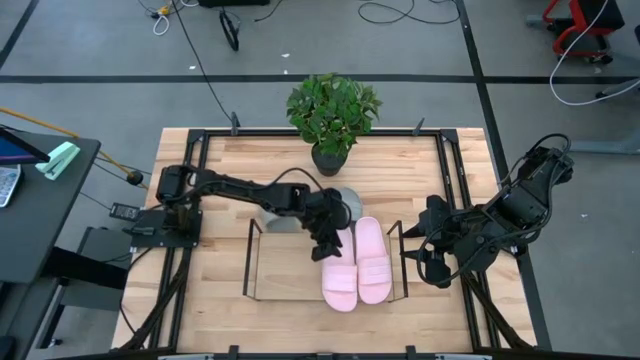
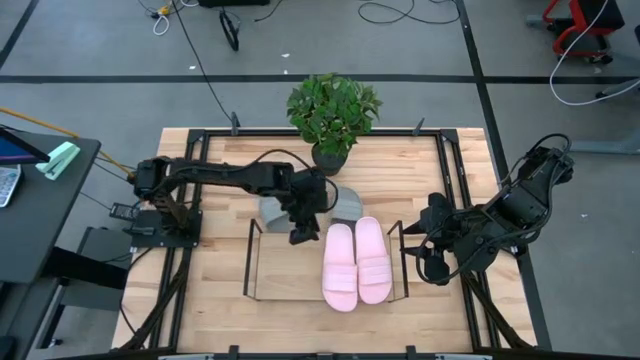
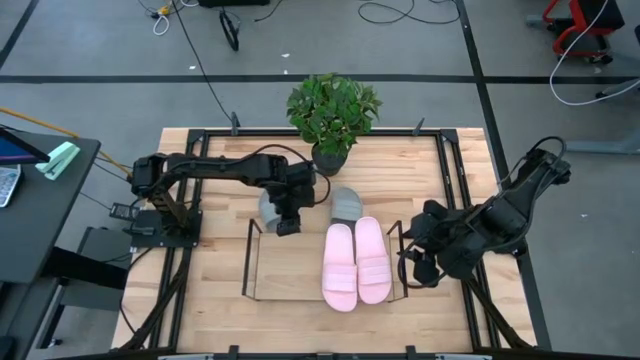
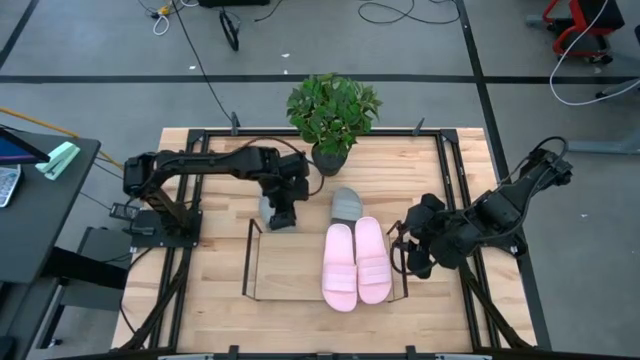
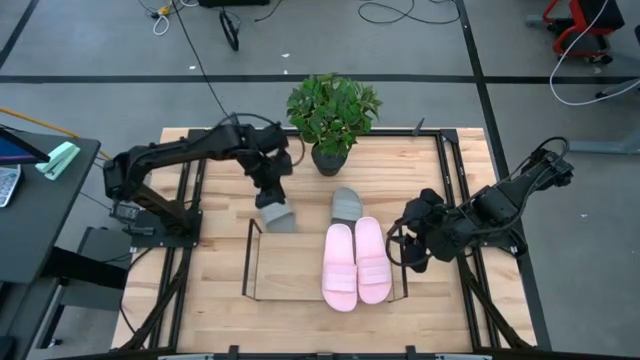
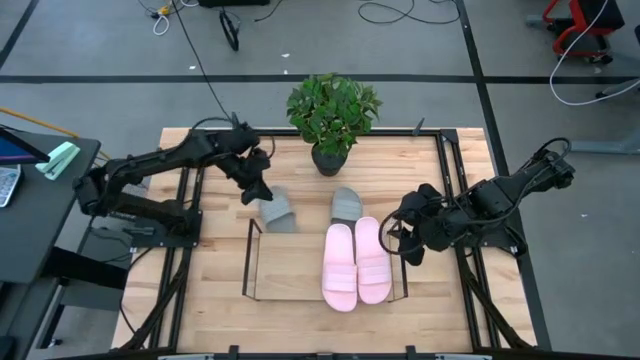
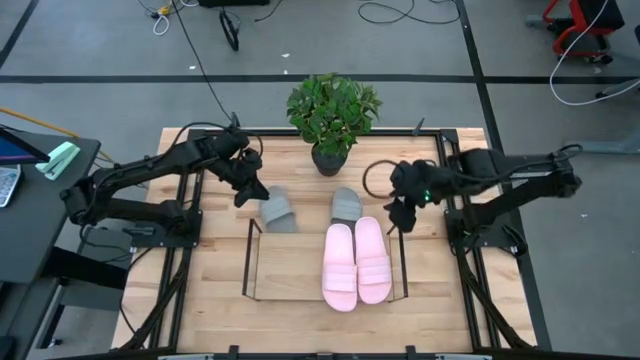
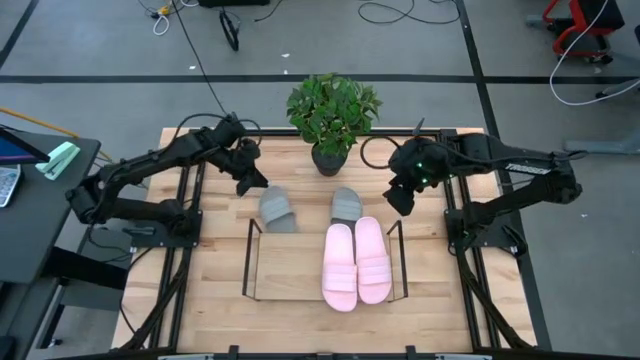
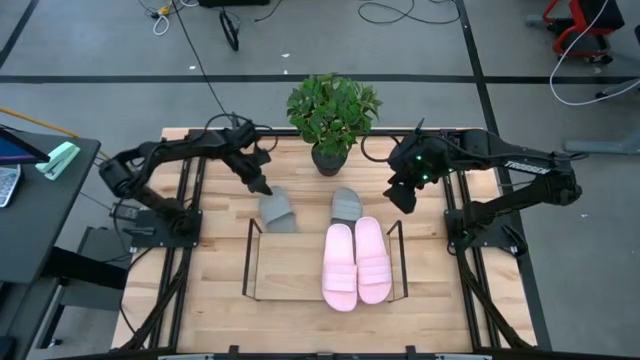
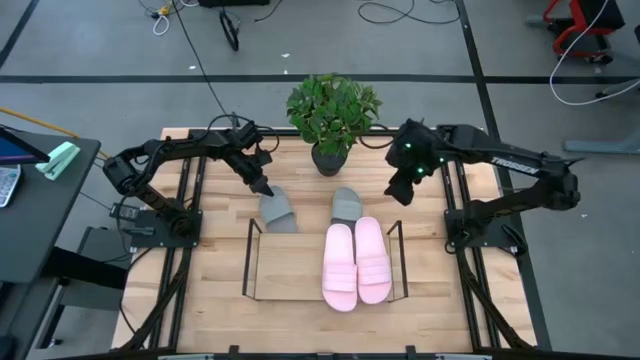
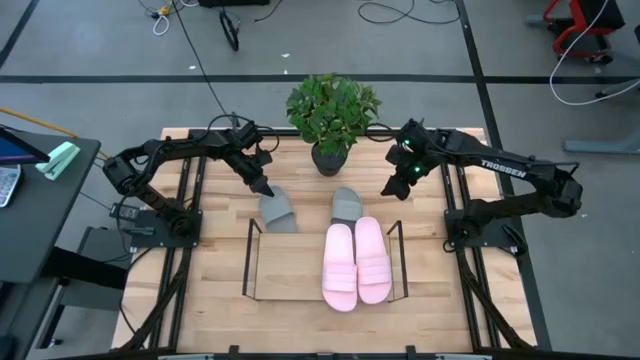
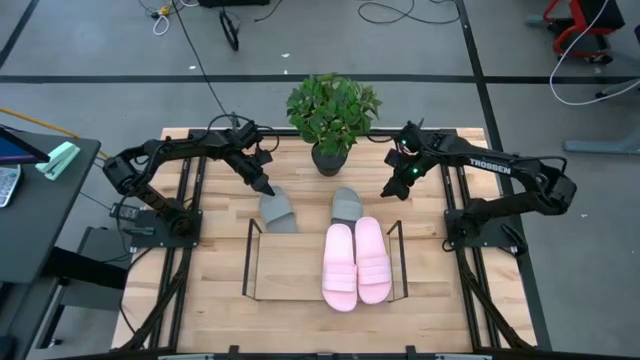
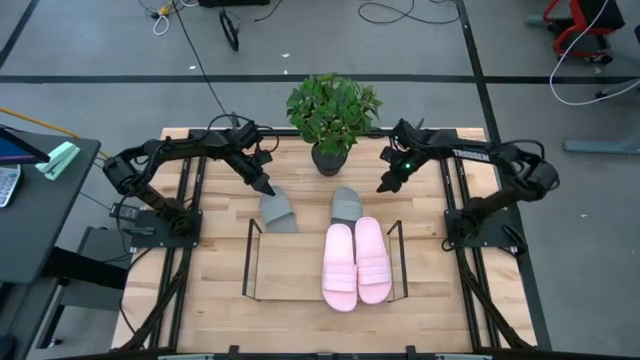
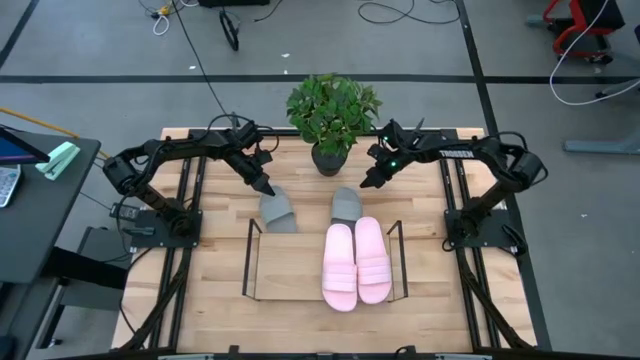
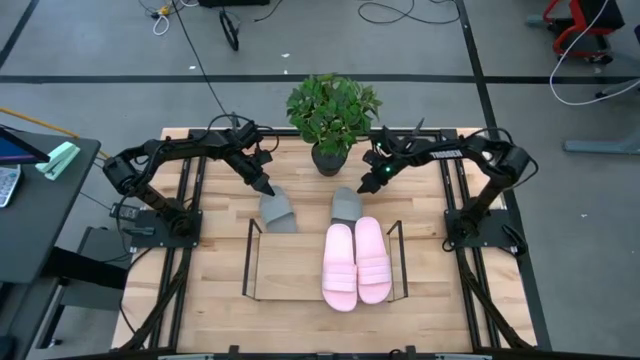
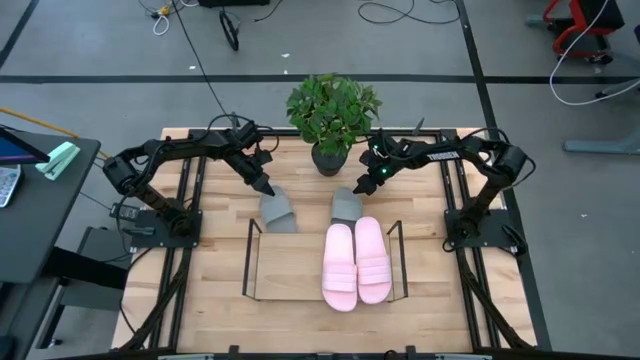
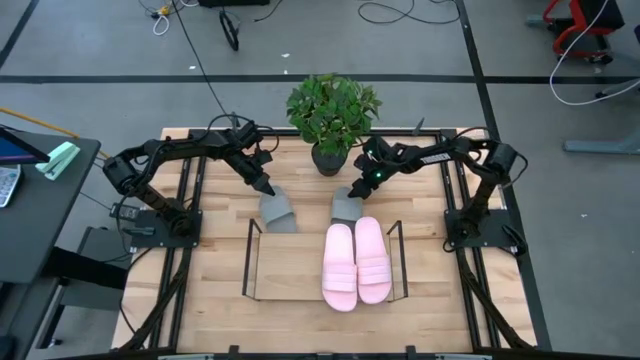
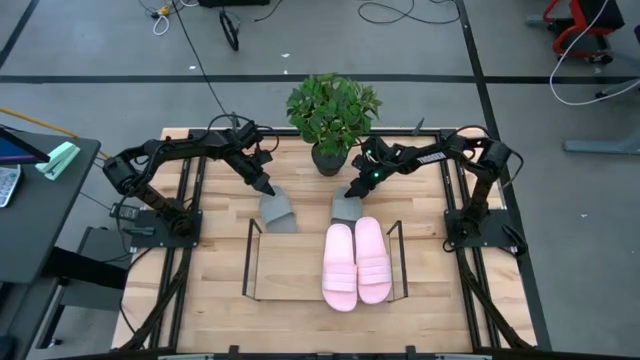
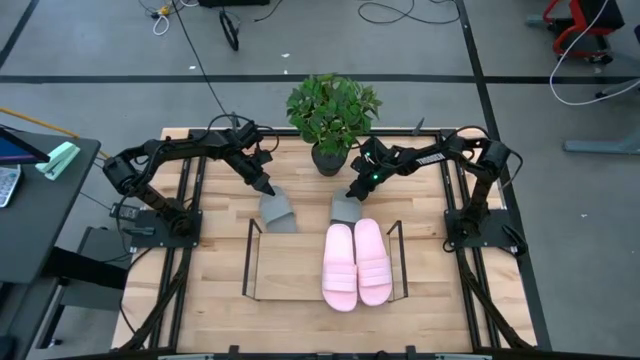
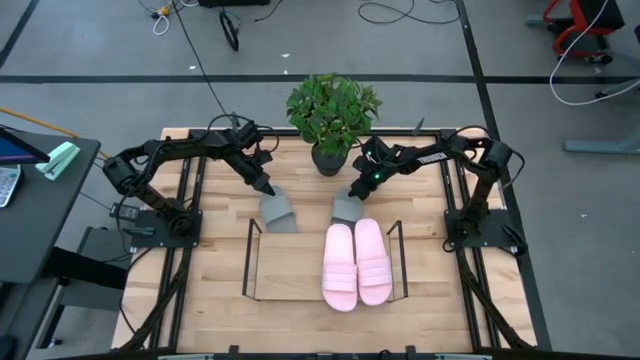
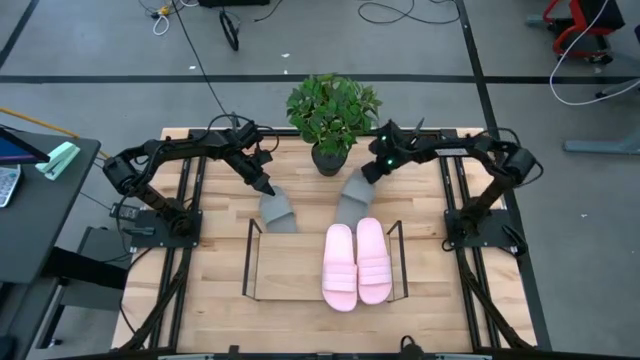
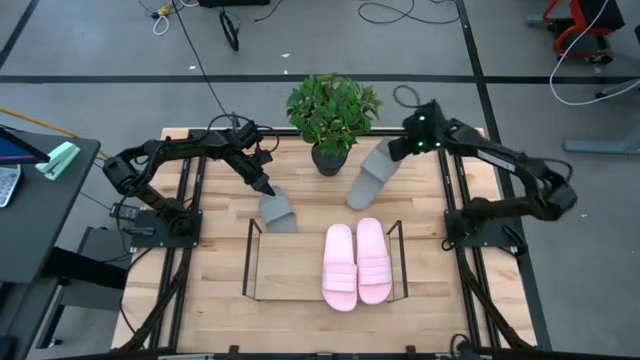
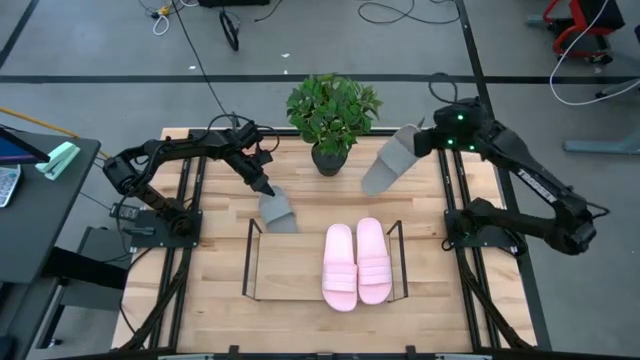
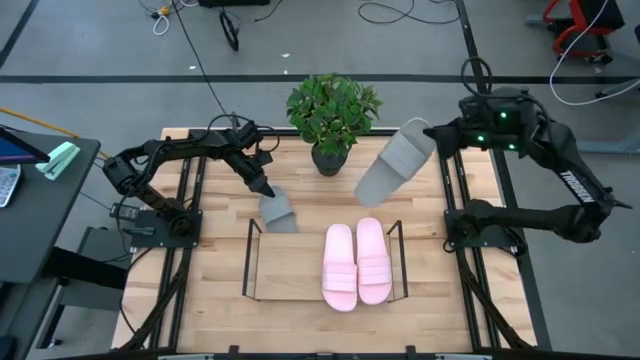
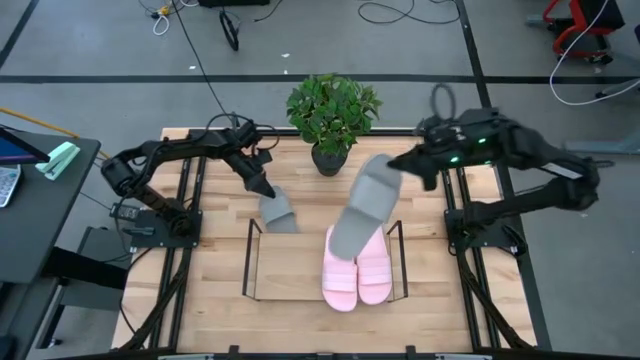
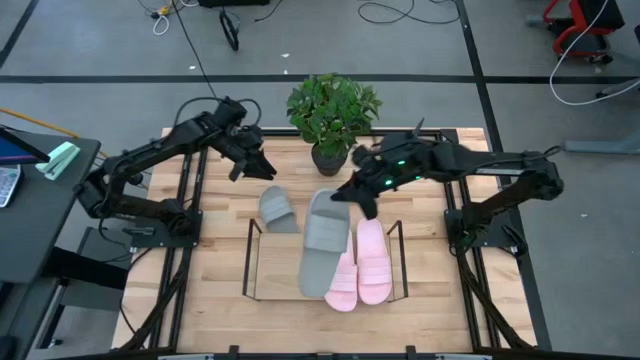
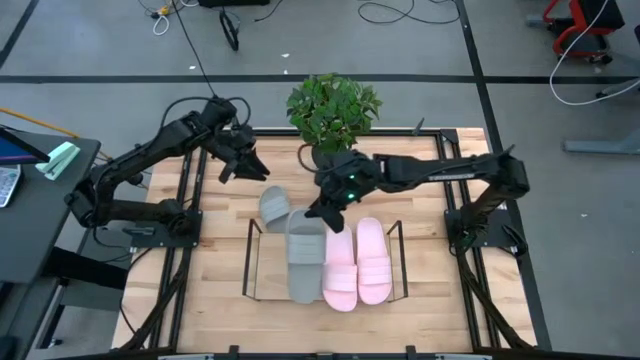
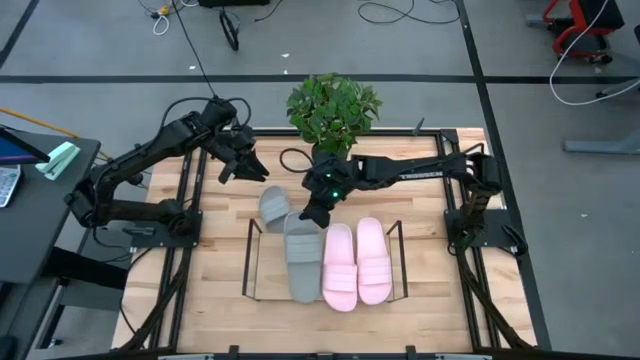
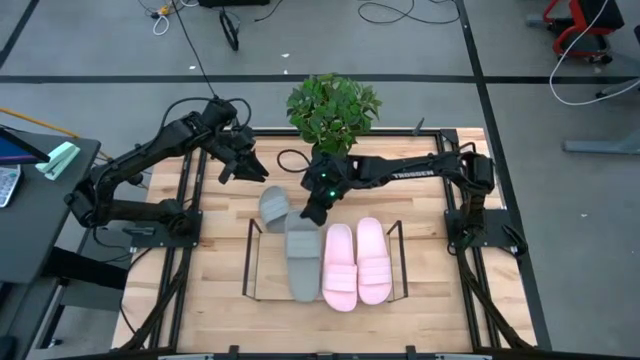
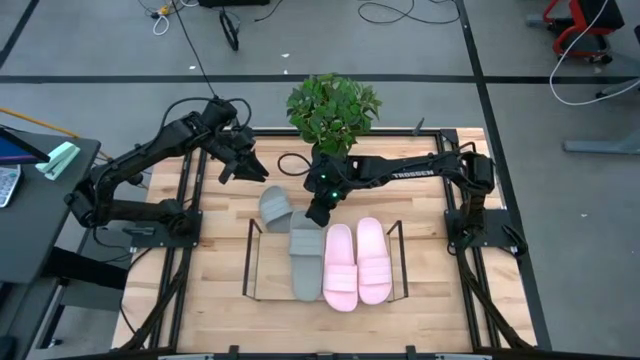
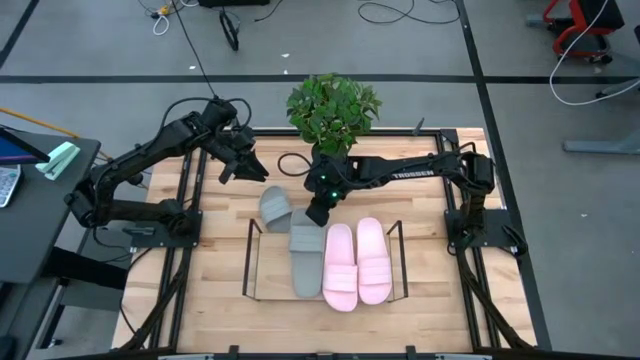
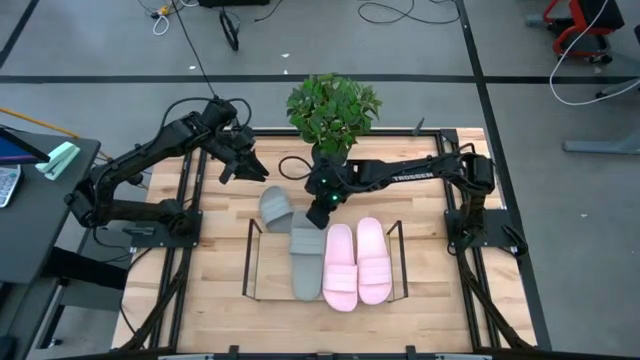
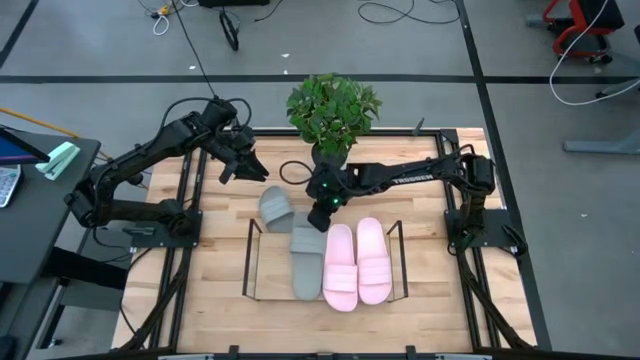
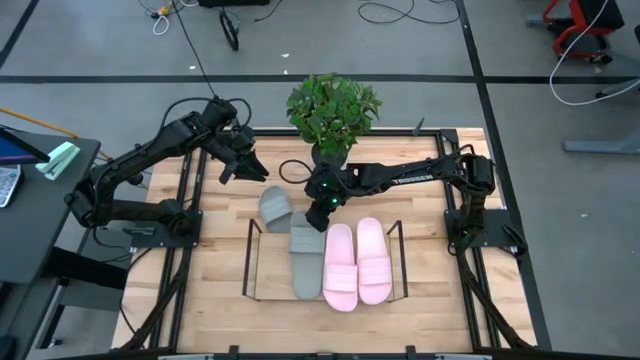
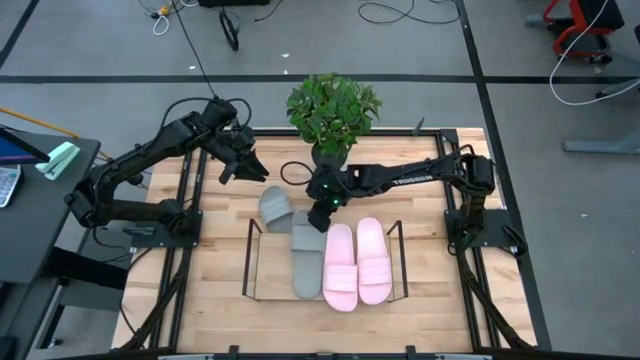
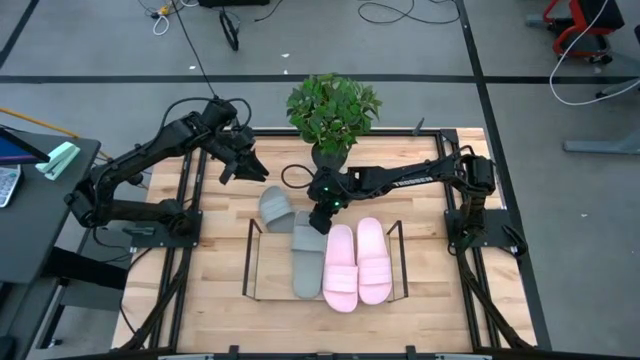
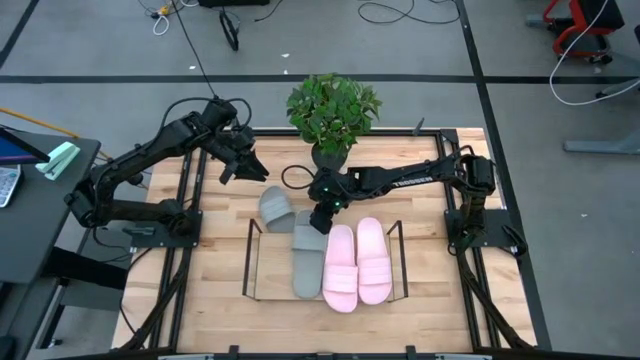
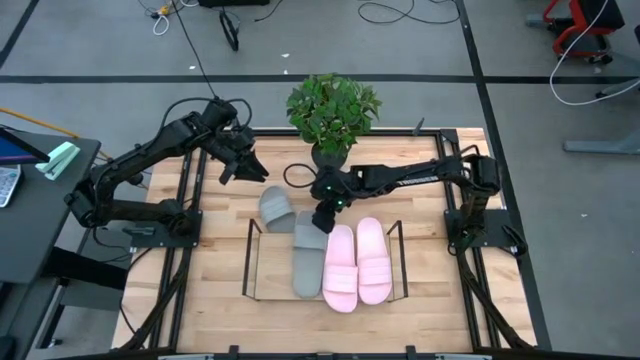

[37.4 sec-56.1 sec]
Task: Pick and place slides into the shelf
Put the right gray slipper on the shelf

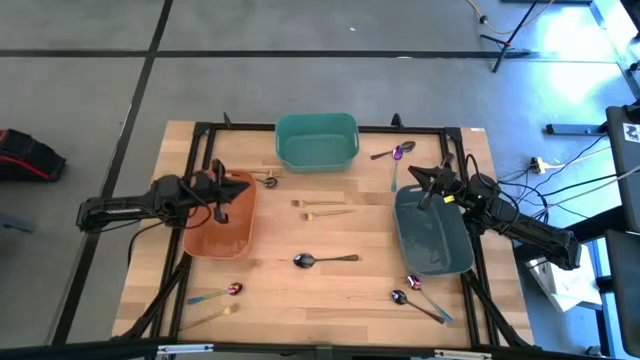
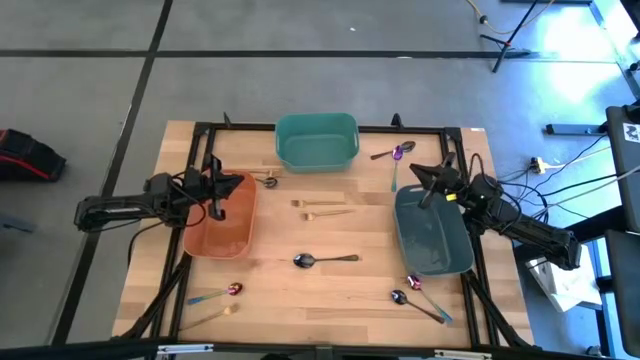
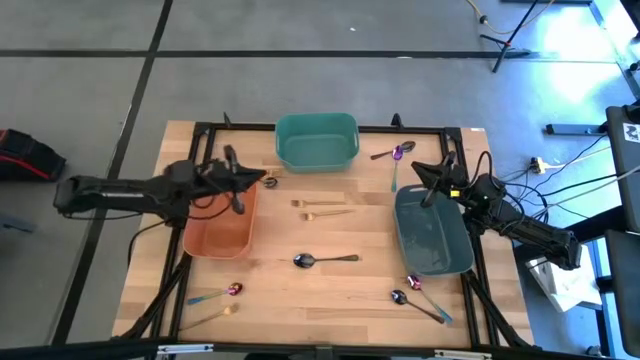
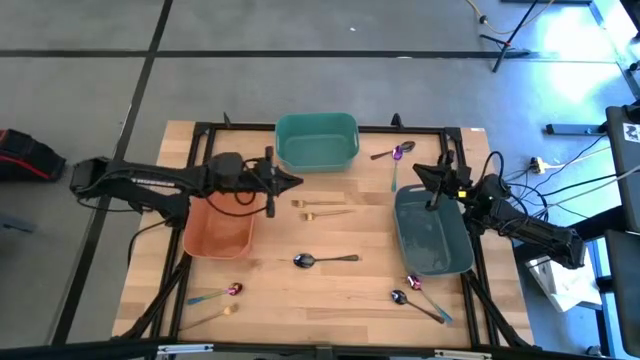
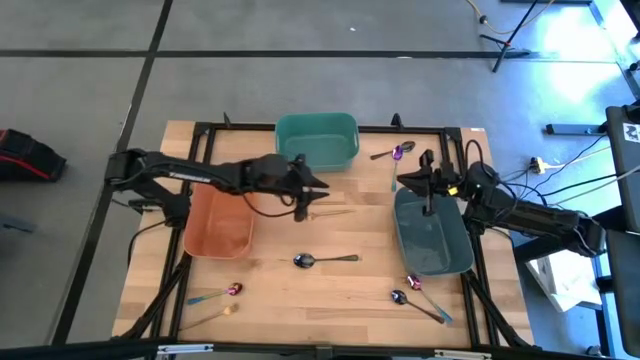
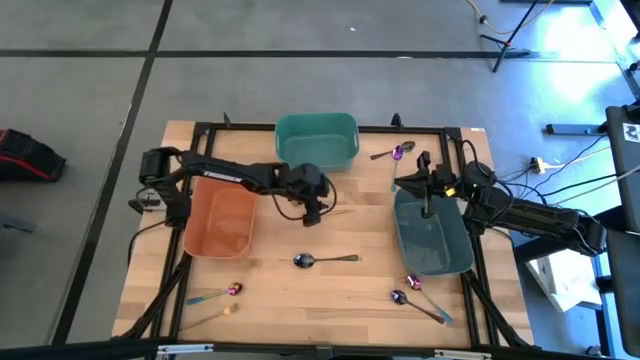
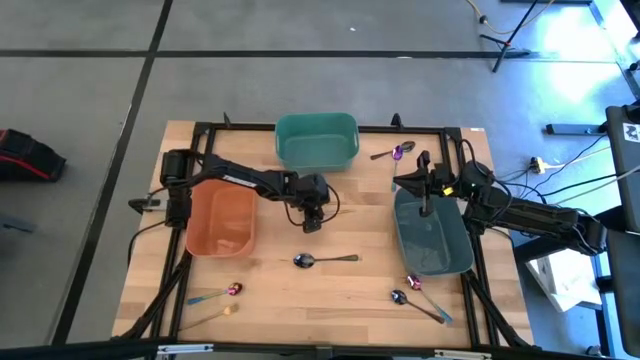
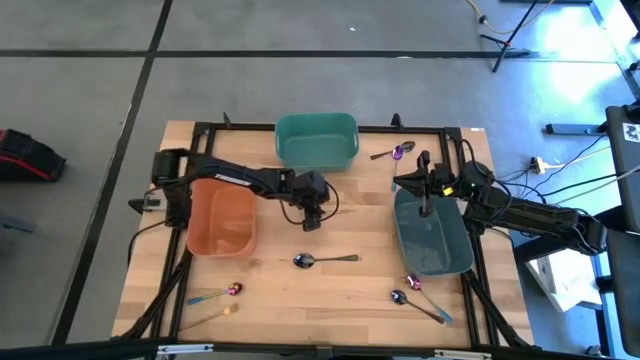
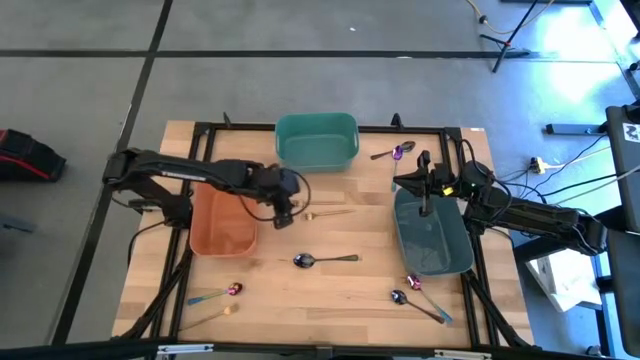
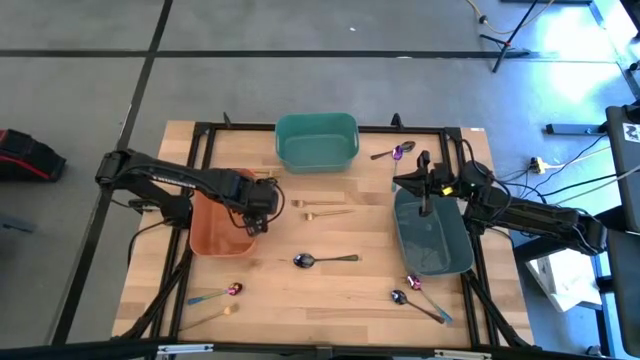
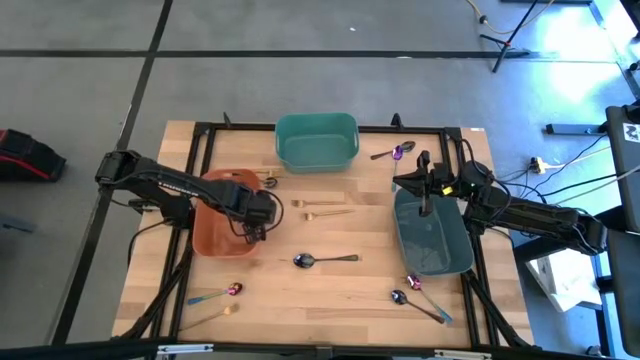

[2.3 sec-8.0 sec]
Task: Sort silverware by color (type)
Adjust the orange bin
